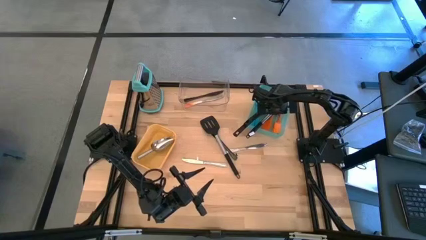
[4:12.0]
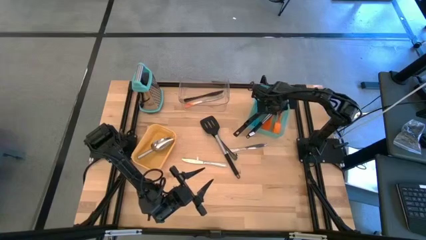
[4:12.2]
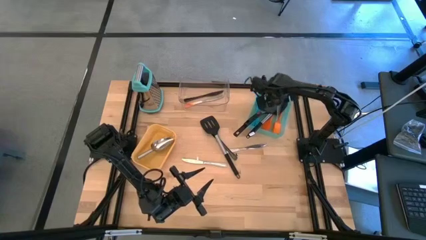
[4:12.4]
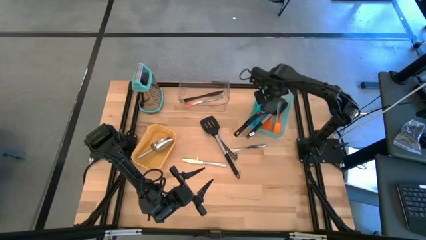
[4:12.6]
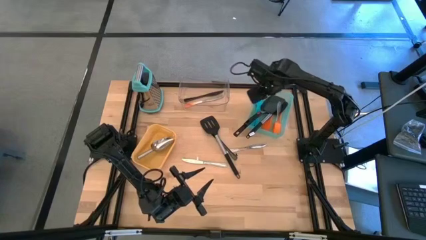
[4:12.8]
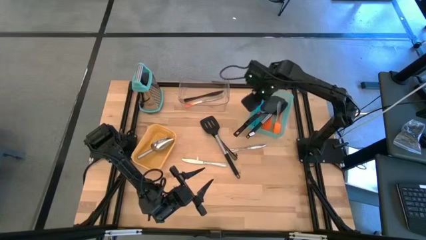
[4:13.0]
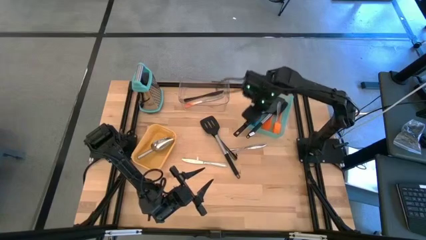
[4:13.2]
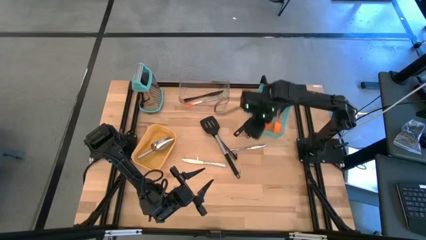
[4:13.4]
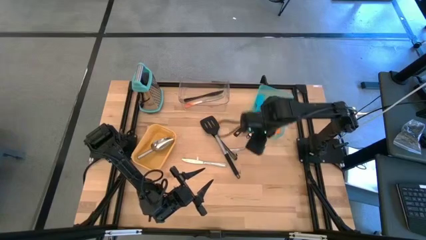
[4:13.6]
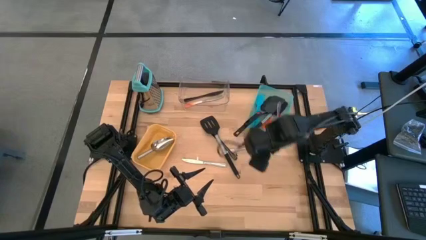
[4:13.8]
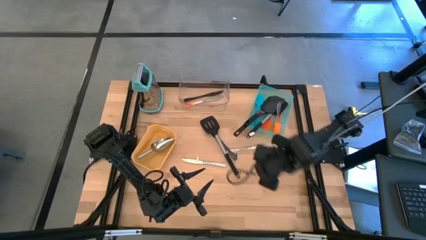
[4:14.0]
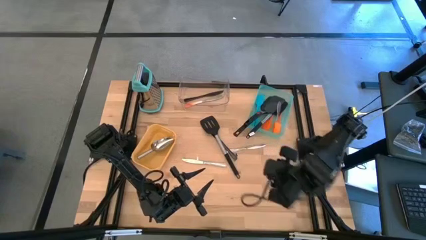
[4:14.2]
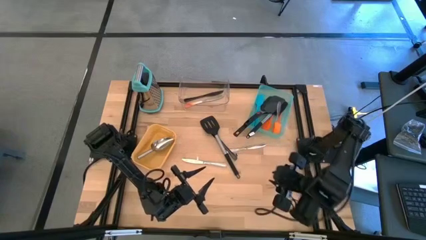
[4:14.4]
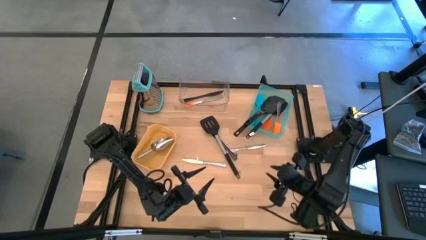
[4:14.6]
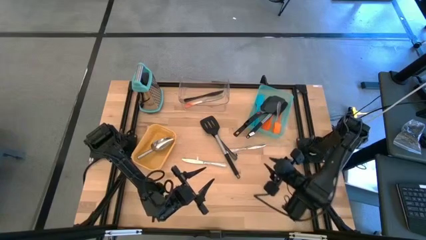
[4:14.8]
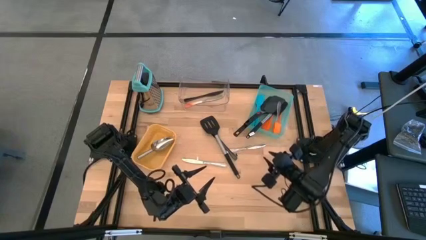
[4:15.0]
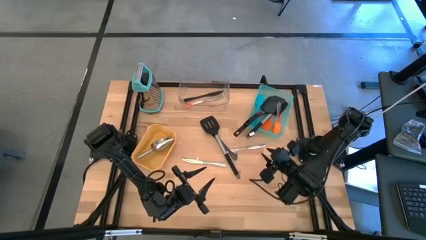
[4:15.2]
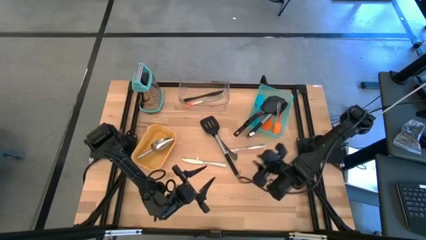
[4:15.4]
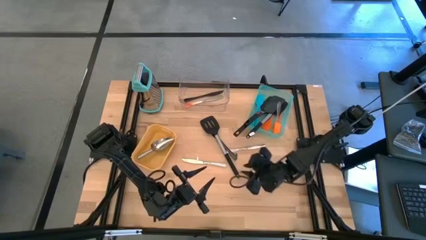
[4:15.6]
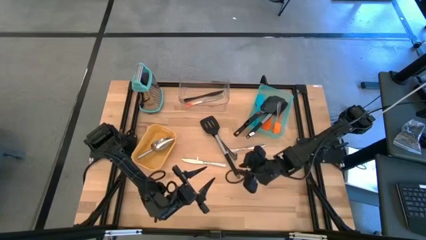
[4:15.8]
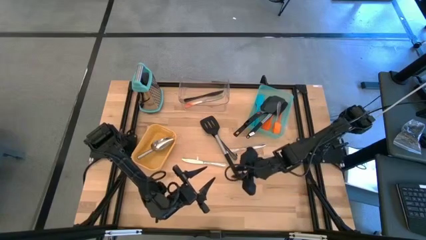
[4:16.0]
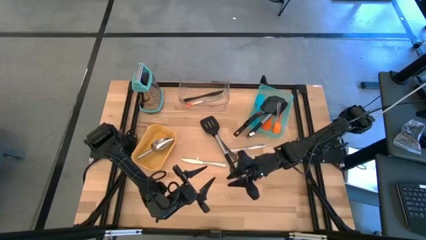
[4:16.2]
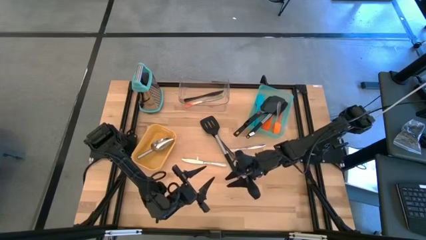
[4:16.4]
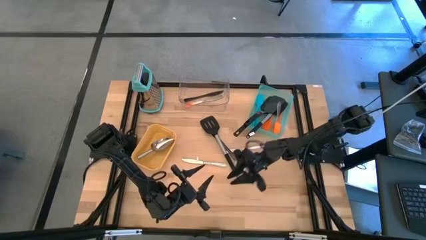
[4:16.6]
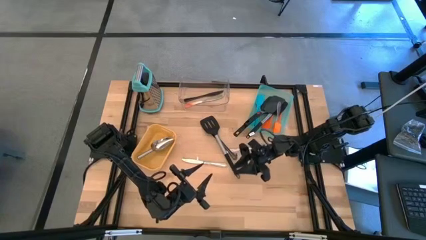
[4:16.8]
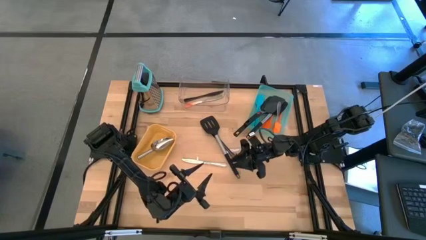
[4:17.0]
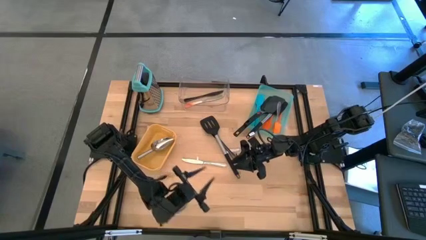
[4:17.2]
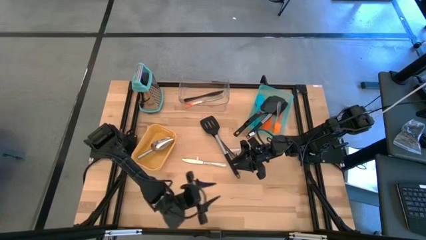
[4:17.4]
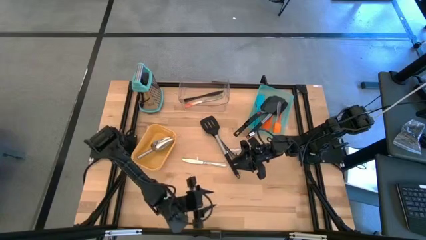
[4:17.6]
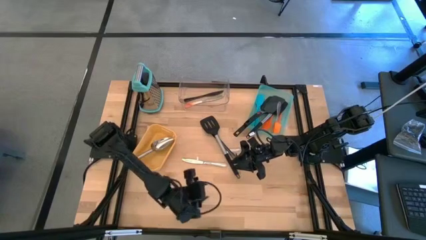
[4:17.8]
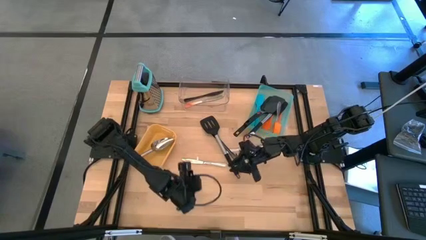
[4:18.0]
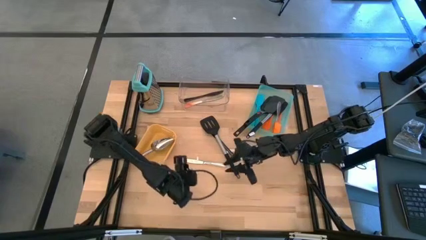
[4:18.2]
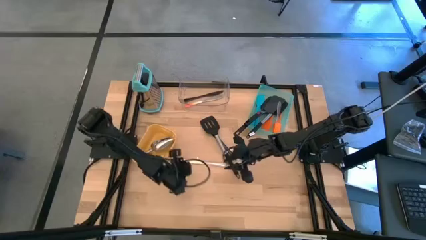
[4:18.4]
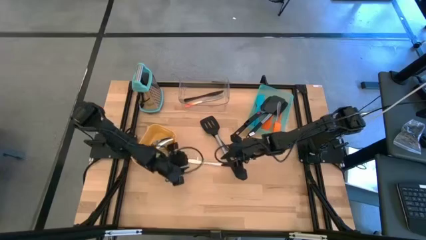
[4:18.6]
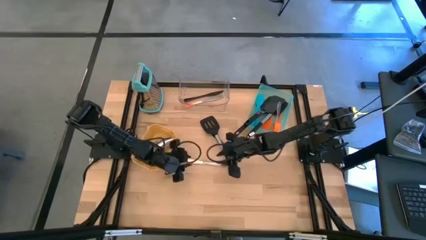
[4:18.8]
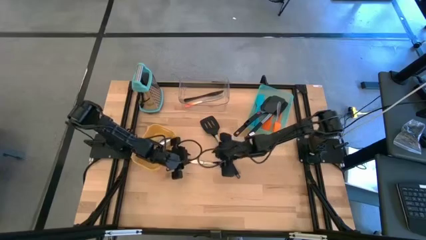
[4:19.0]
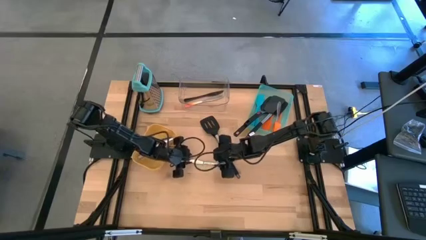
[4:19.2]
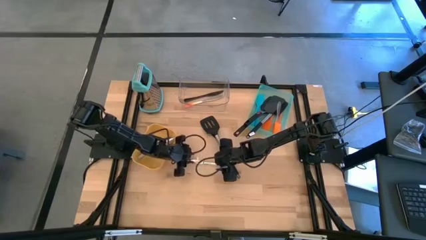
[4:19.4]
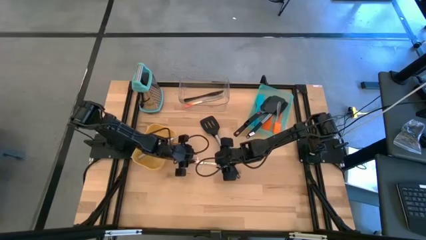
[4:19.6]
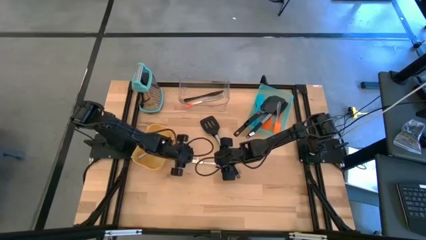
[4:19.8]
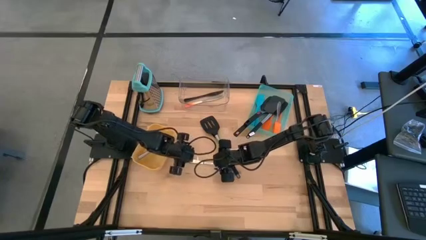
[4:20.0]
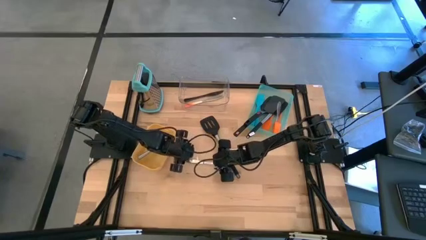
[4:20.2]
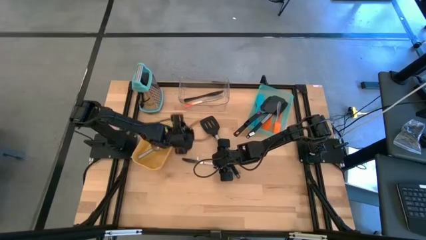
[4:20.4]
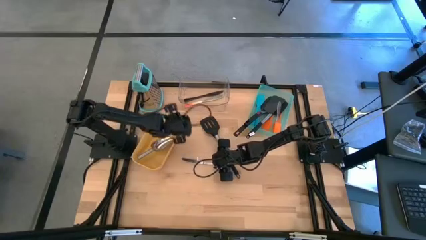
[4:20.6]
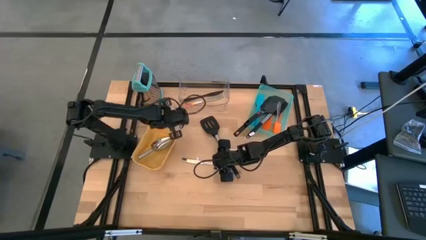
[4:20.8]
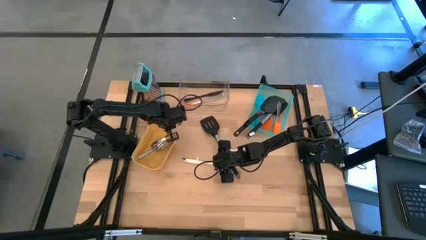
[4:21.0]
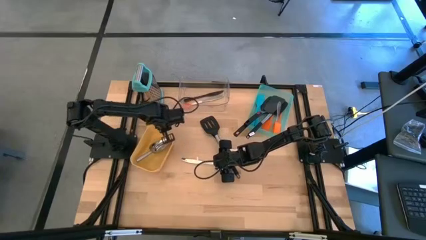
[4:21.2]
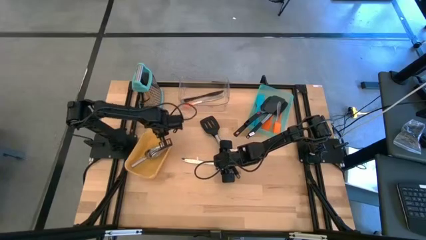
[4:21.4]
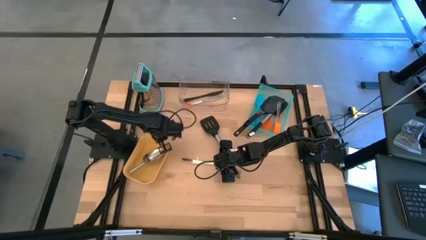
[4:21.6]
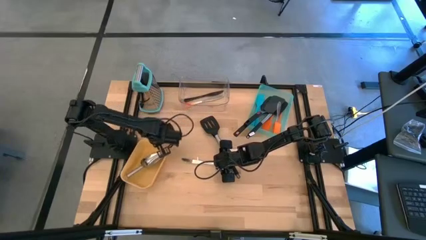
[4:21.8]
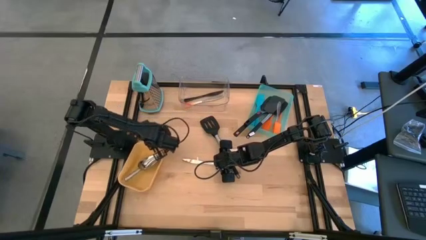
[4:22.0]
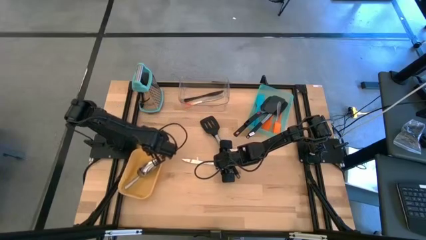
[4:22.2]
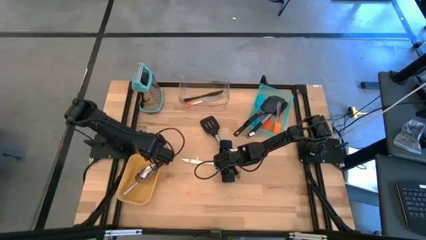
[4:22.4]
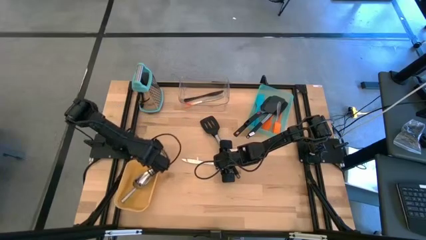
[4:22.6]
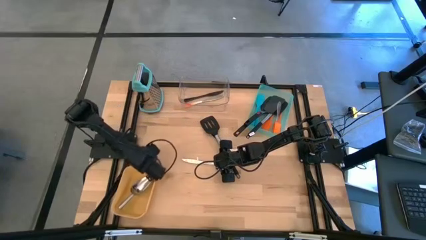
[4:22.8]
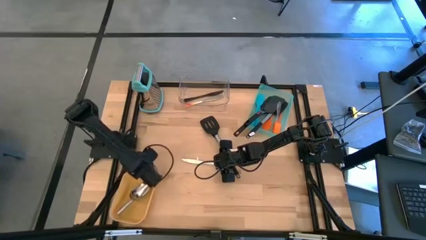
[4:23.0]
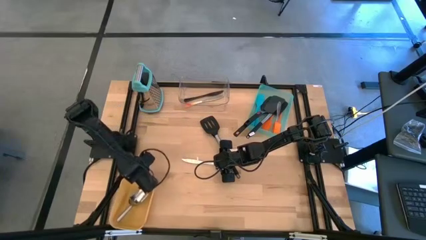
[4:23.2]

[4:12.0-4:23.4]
Task: Pick & Place Kitchen Items
Move the yellow bin to the bottom left of the table

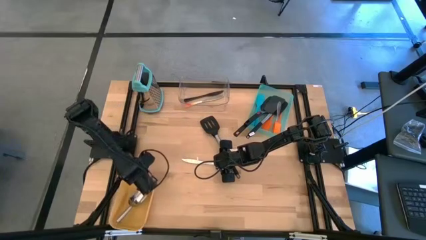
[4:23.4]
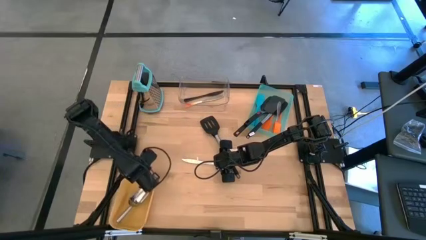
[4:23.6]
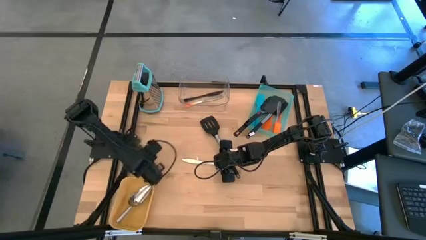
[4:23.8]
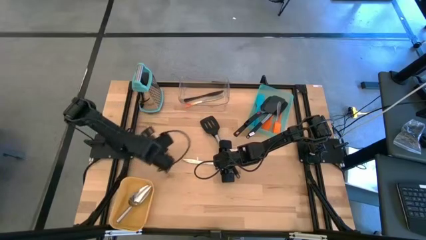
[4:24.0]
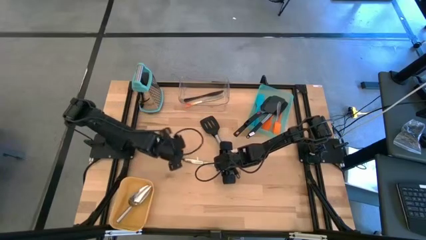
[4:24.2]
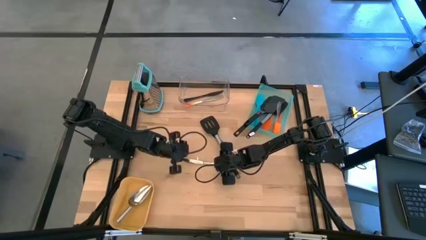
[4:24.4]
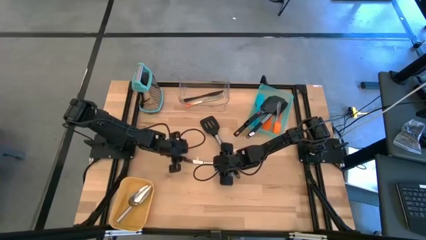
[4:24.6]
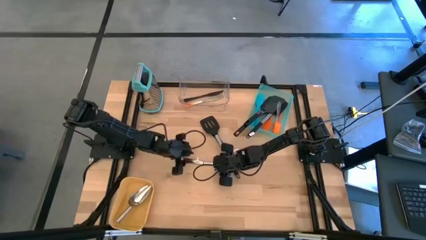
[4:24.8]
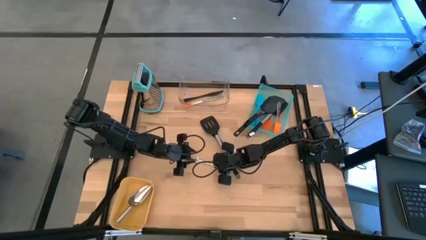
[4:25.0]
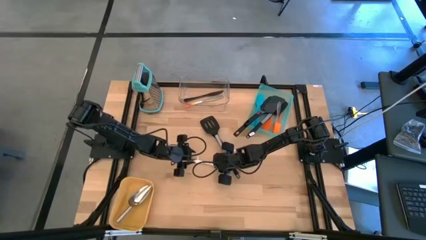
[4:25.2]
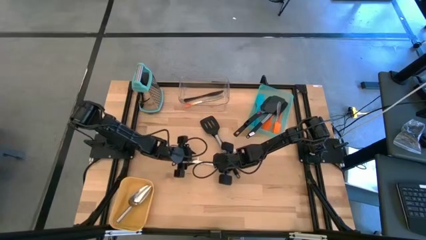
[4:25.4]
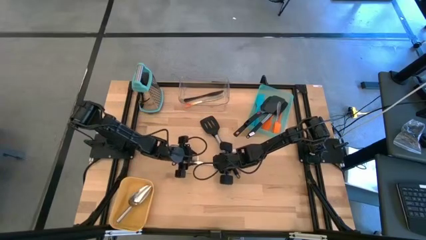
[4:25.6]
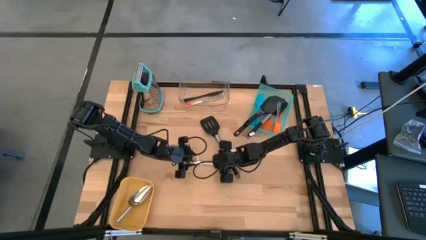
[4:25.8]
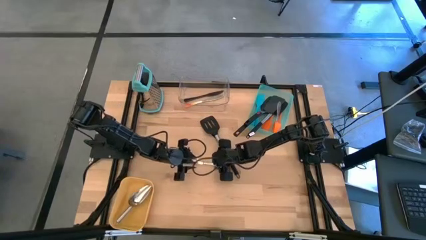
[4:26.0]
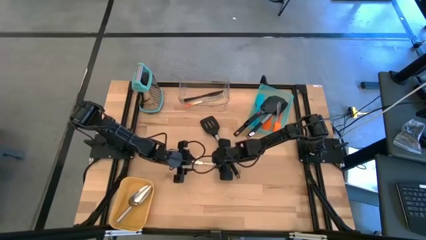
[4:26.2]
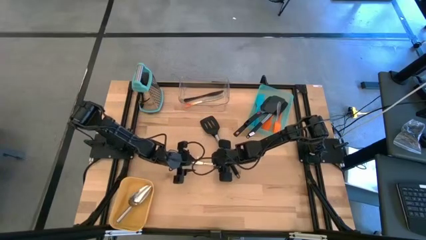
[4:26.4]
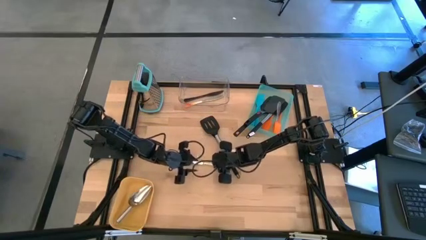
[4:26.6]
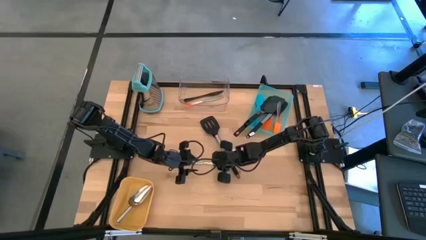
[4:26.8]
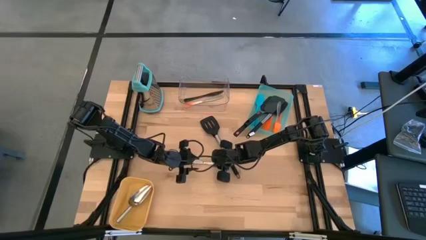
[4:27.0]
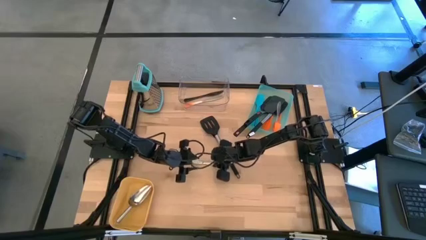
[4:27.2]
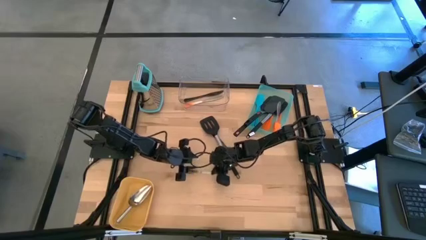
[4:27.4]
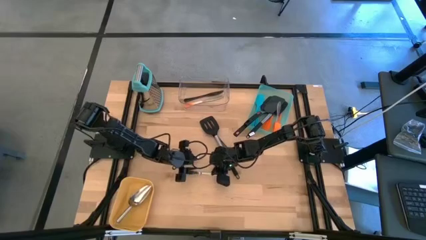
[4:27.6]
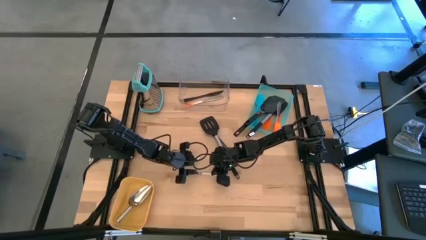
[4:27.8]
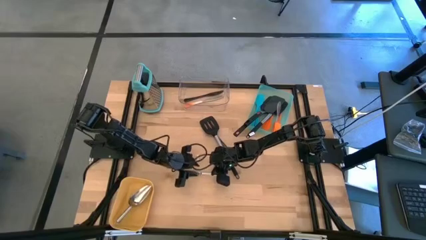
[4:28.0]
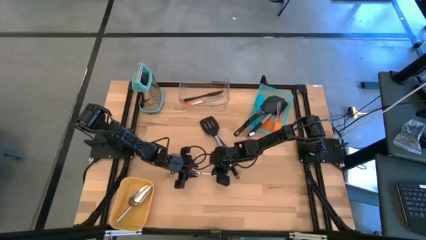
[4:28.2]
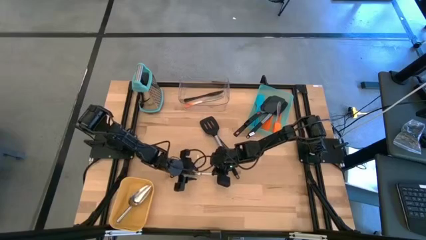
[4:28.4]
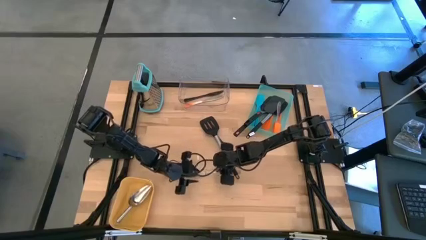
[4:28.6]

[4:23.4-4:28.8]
Put the silver table knife into the transparent bin
